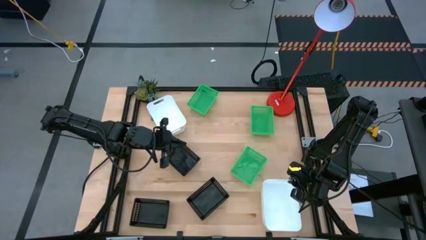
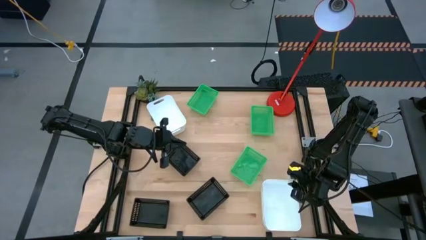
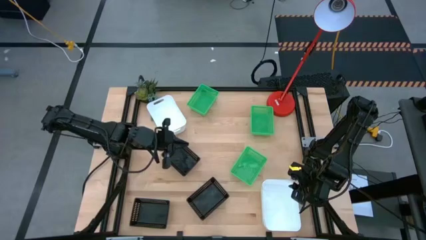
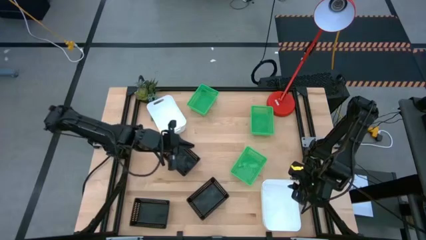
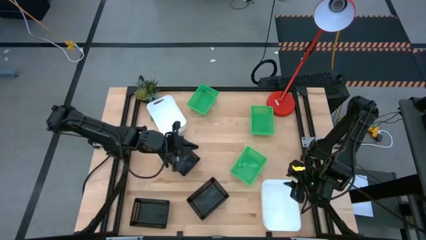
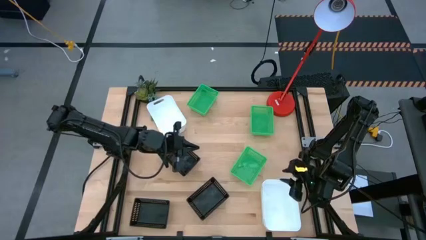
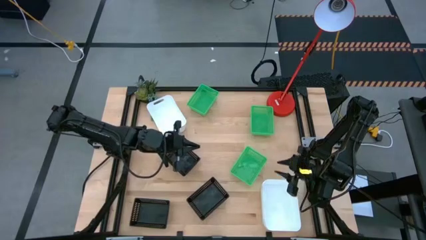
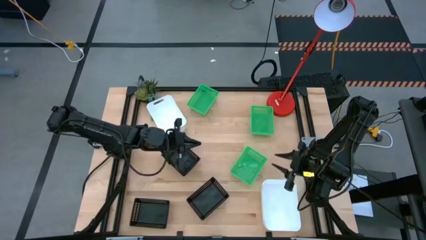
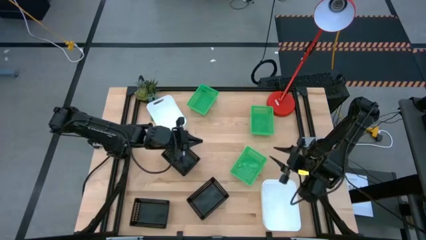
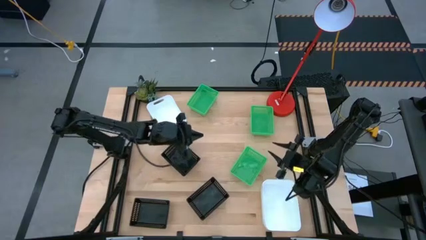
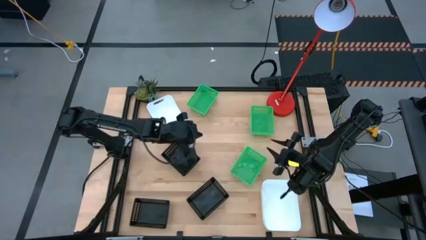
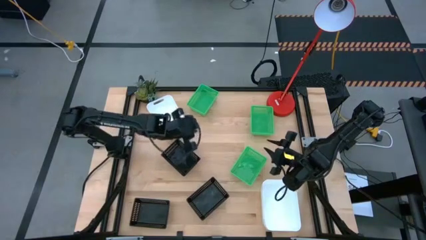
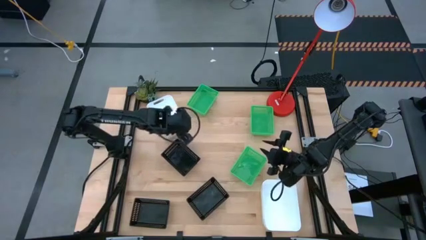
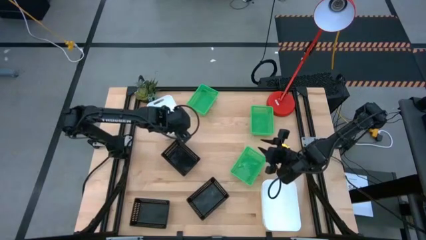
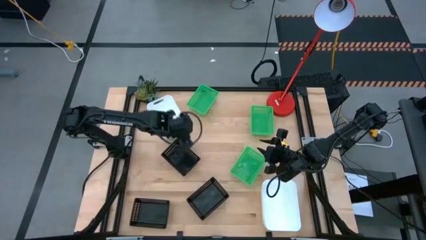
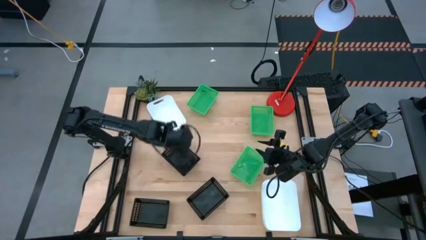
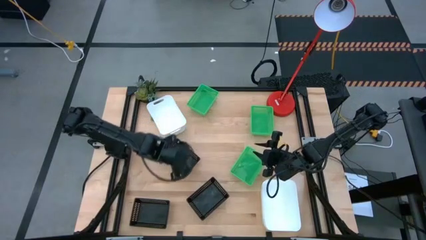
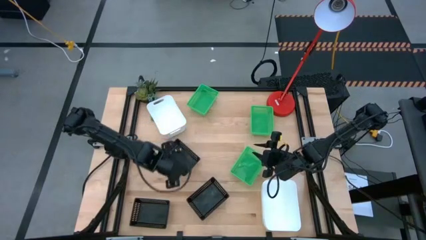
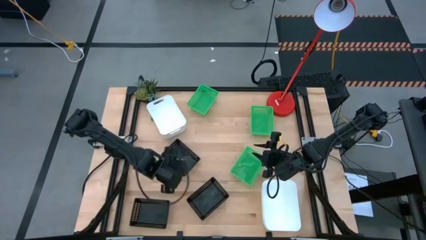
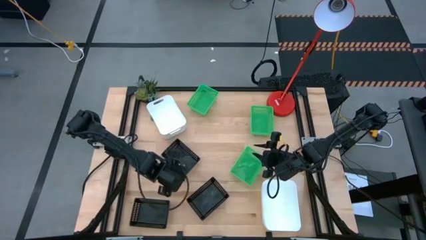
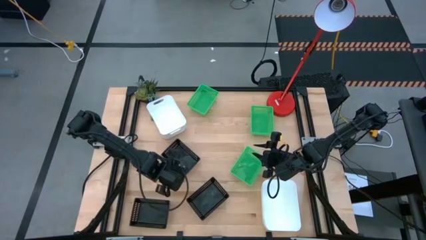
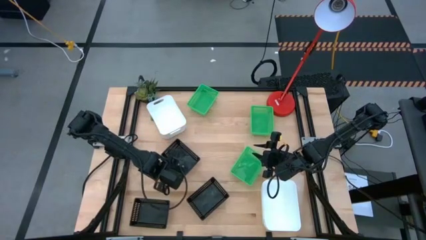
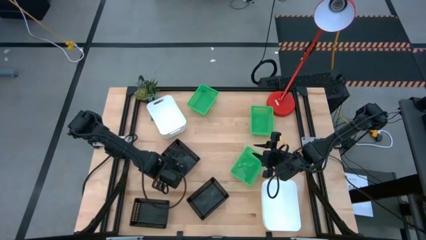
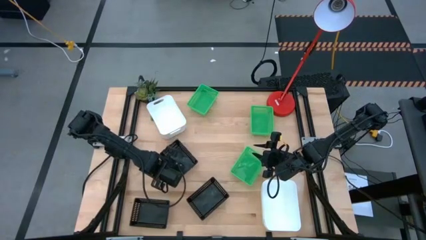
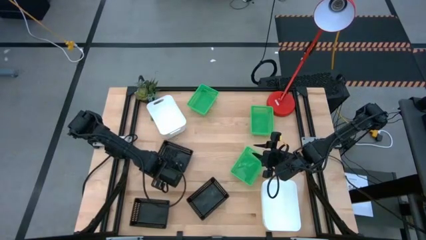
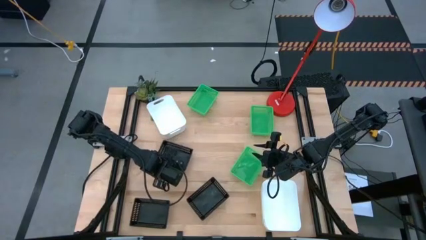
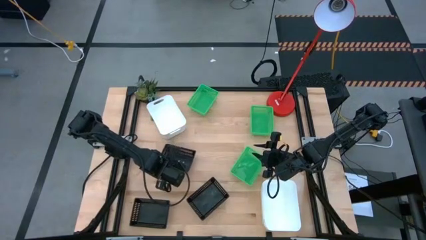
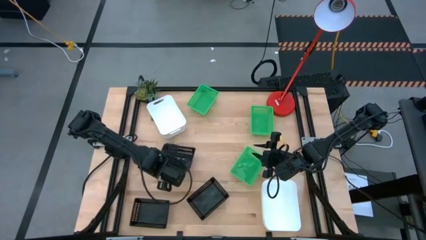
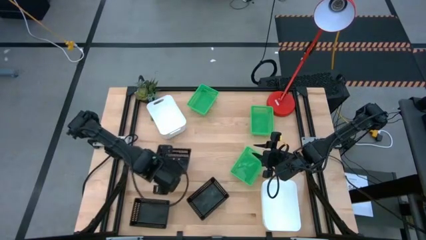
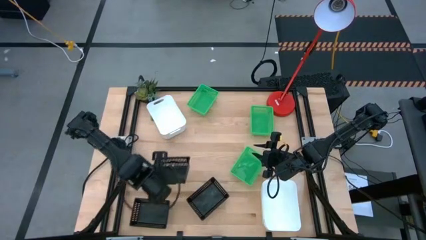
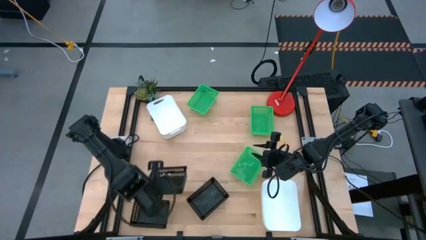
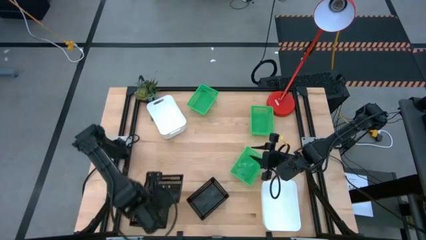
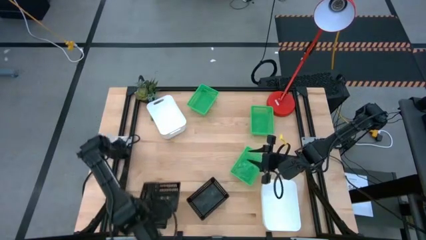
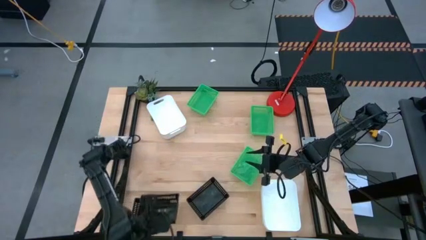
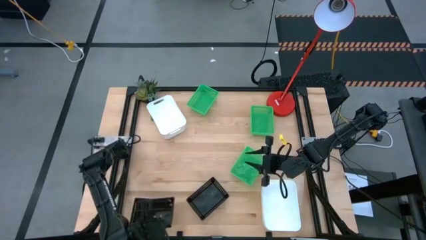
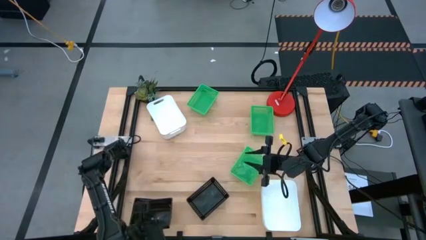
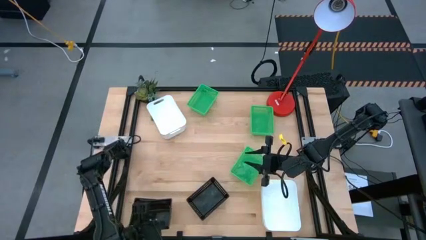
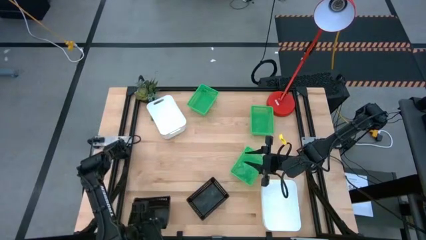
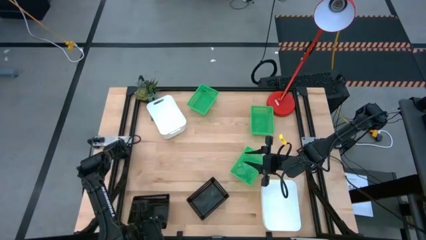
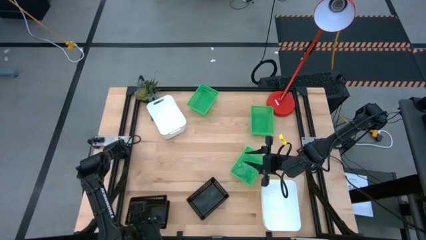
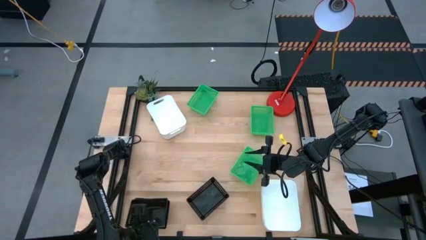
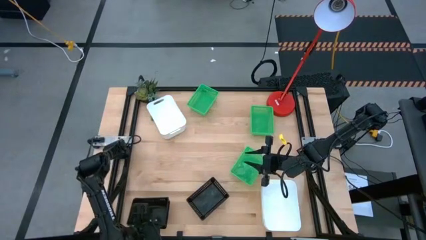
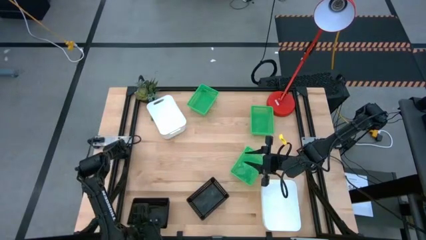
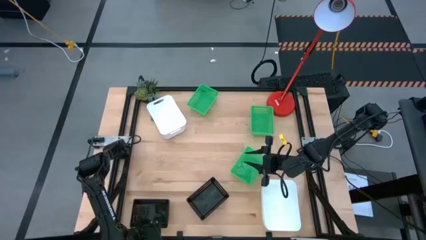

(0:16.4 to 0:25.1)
Stack the top black bin on top of the bottom left black bin

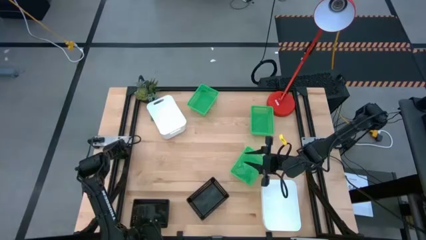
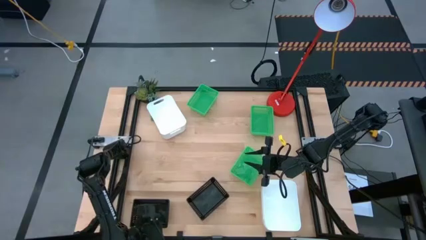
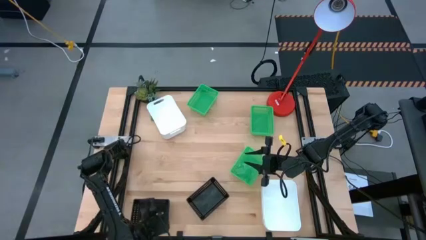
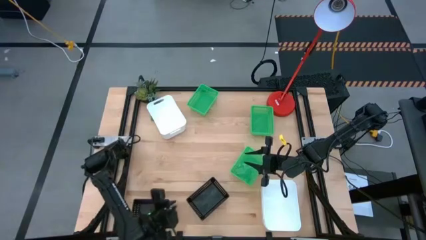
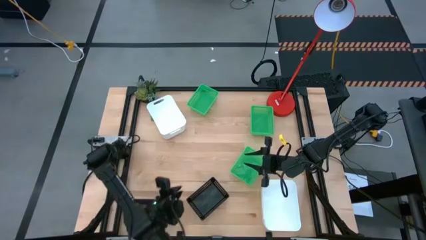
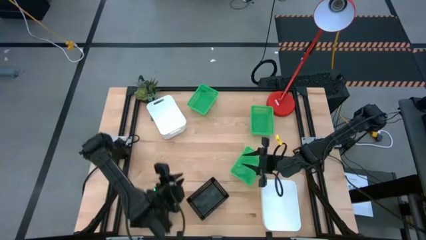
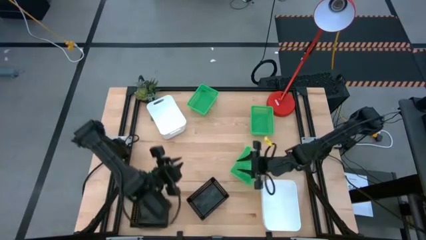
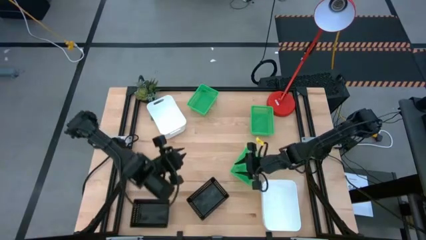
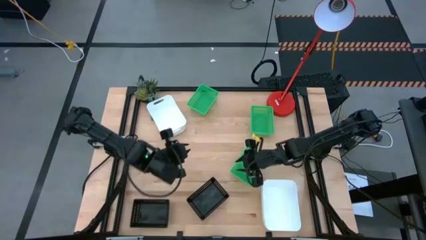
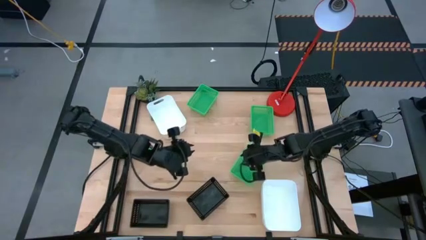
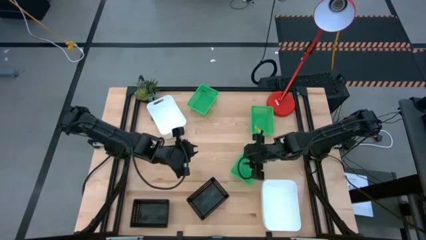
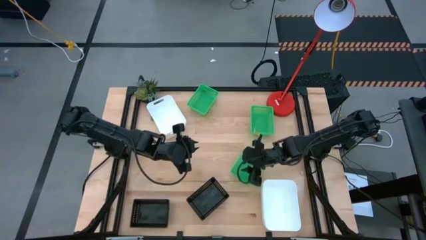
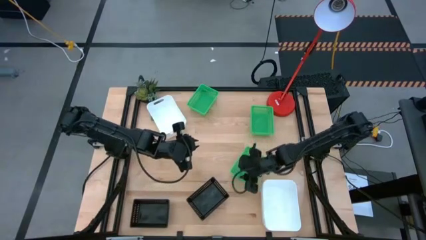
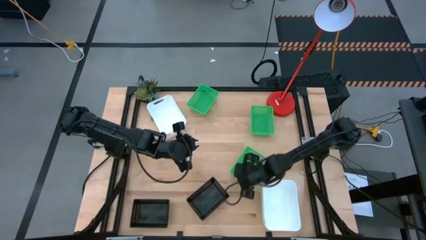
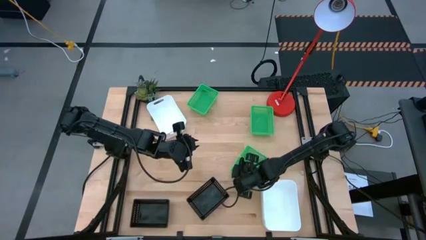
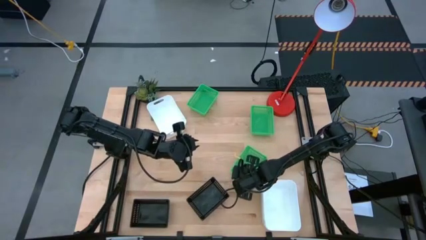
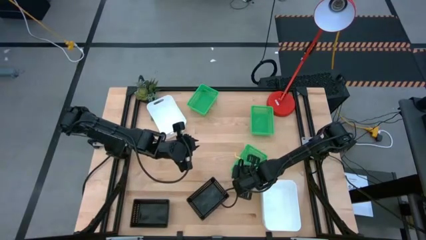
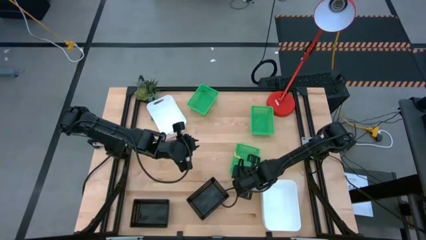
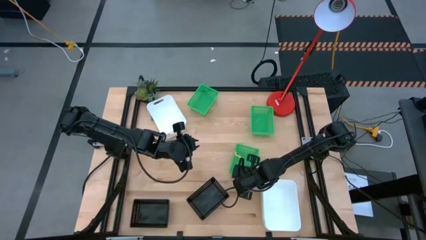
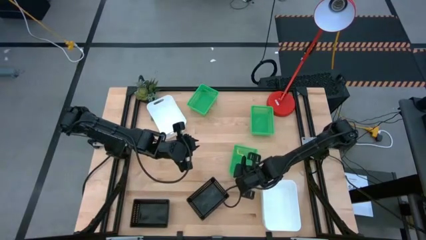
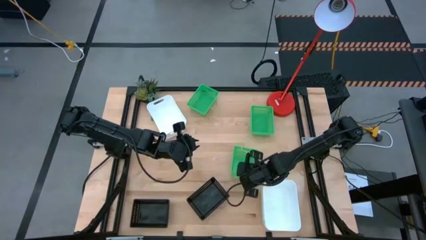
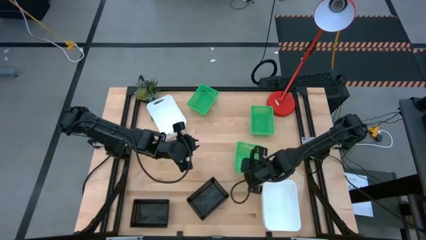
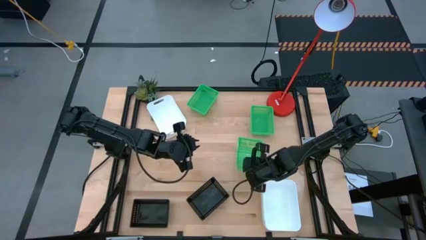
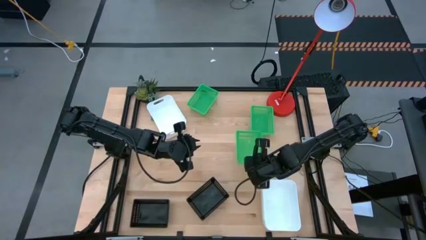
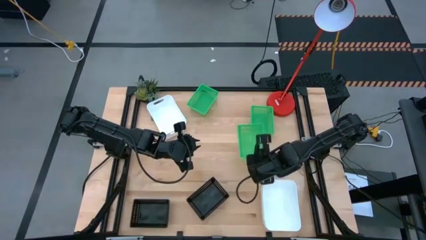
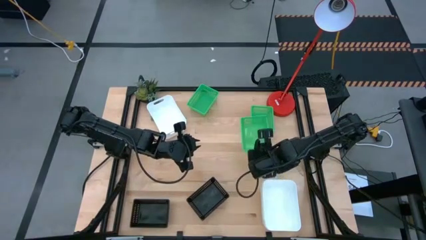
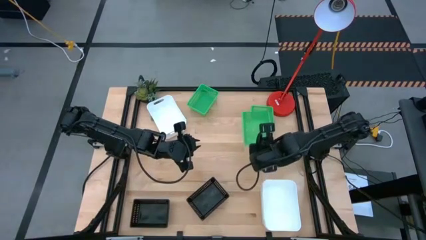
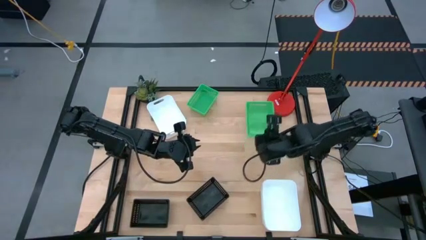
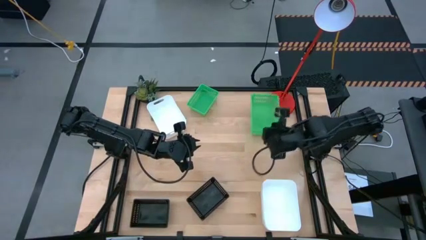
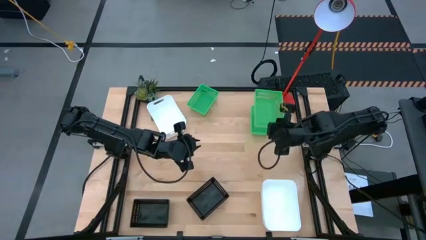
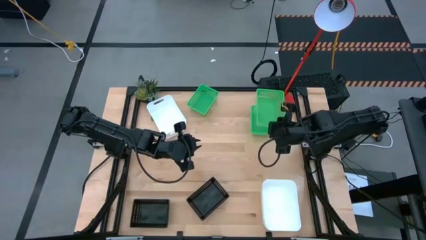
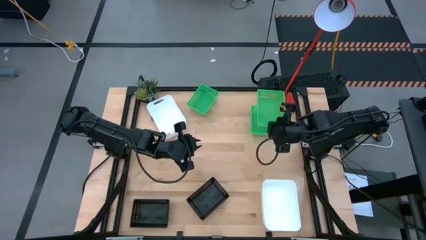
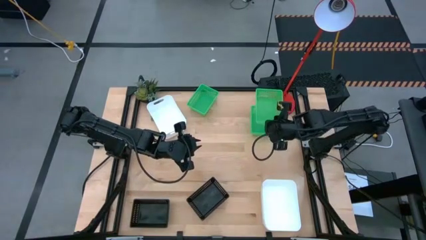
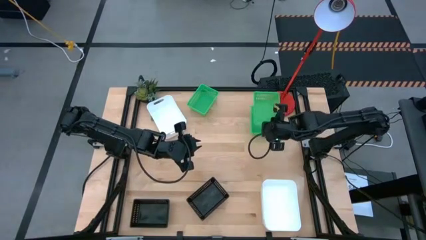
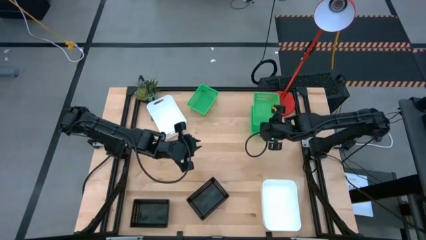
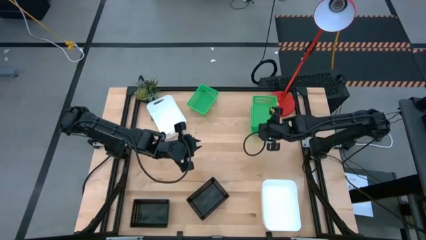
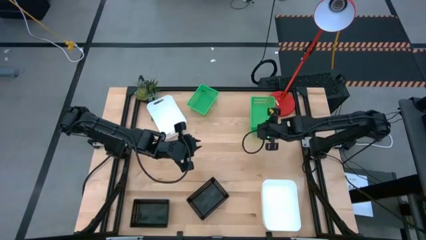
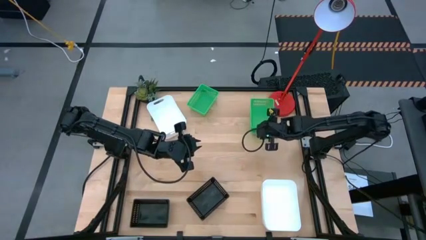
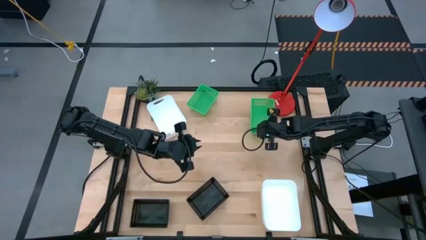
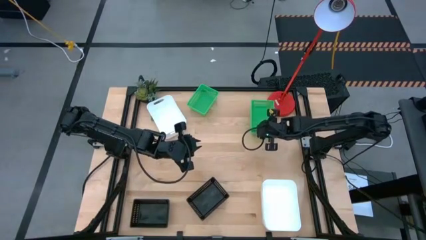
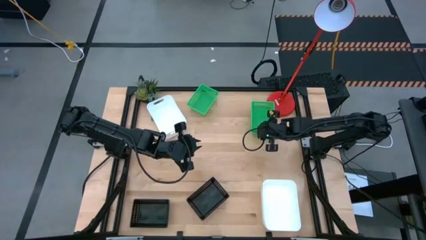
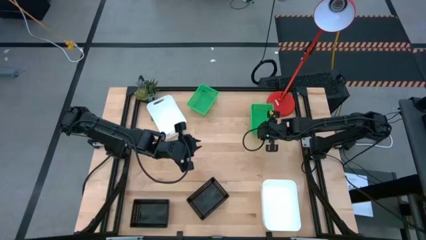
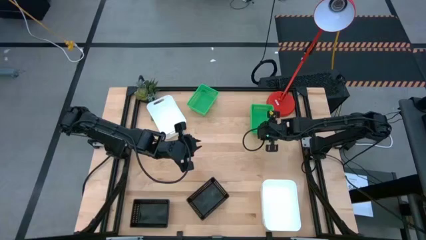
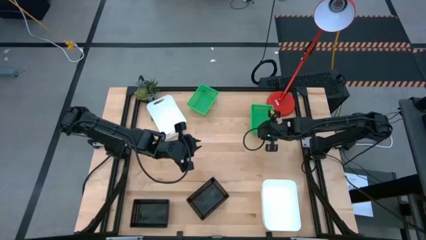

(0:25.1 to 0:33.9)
Stack the bottom green bin on top of the middle green bin
